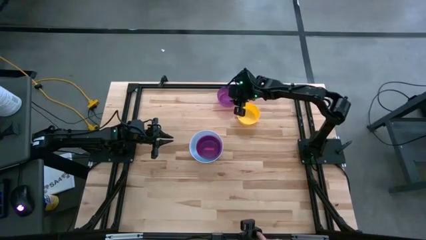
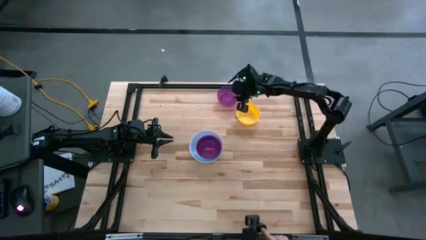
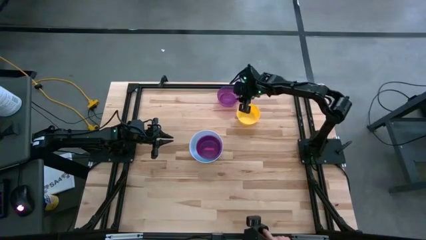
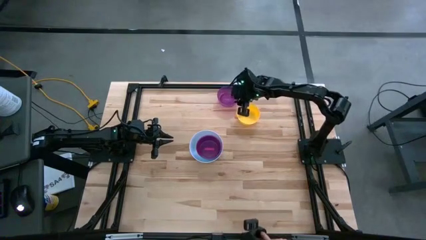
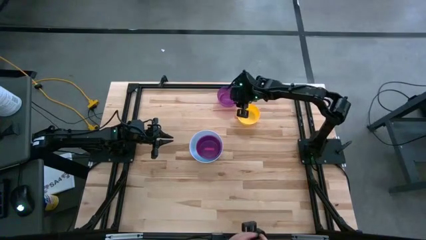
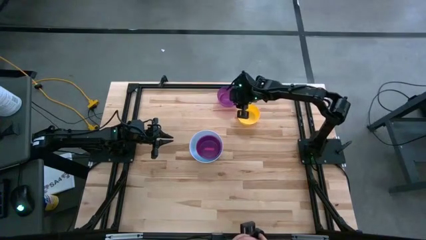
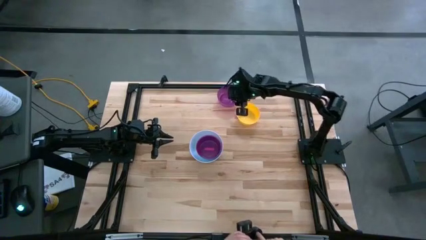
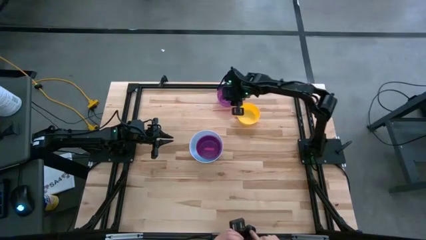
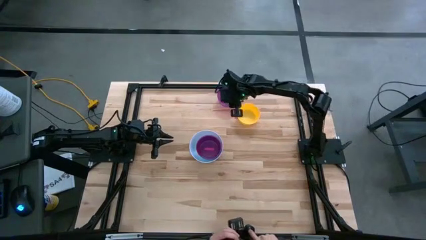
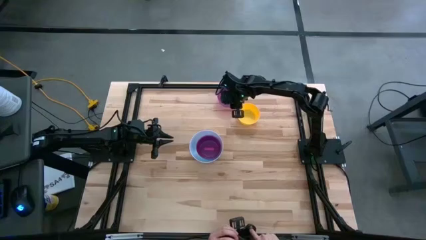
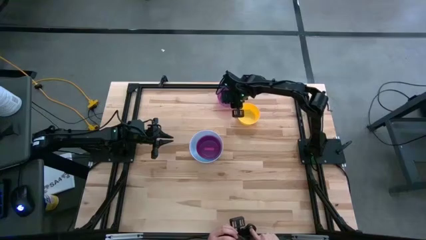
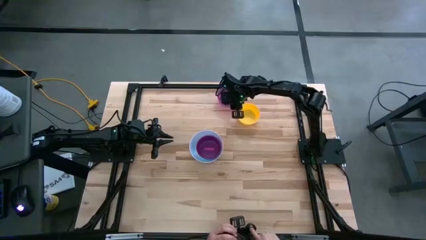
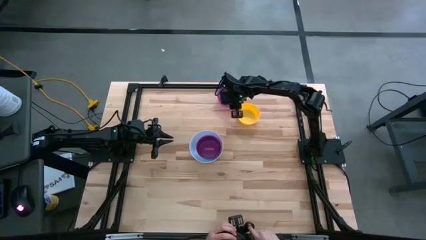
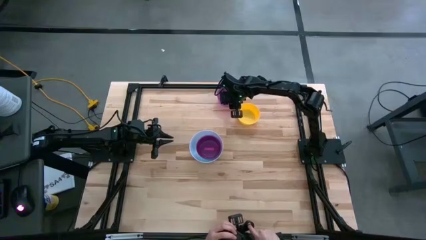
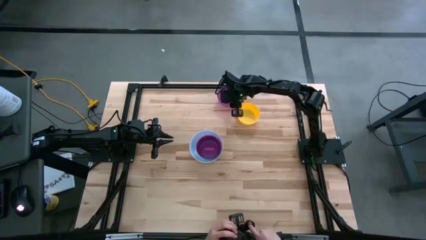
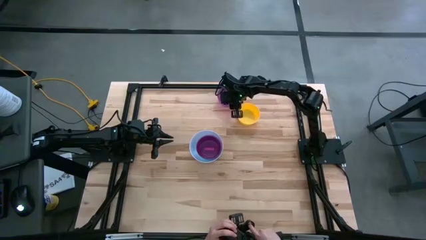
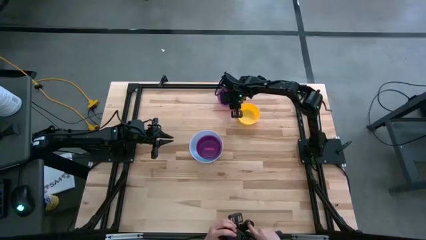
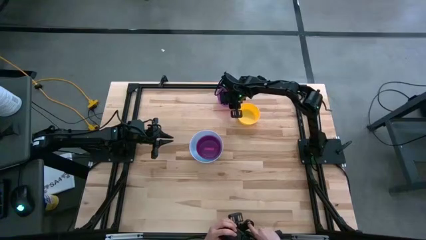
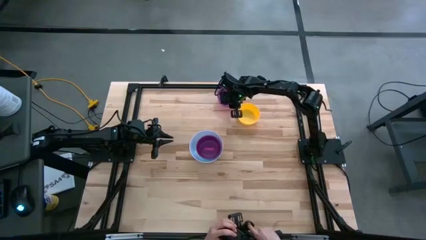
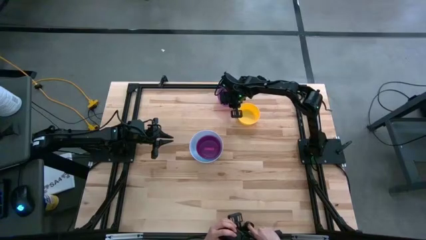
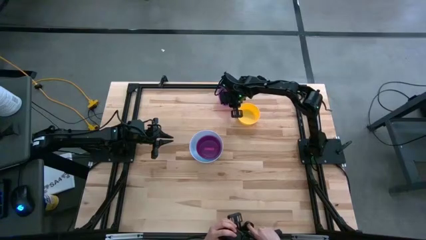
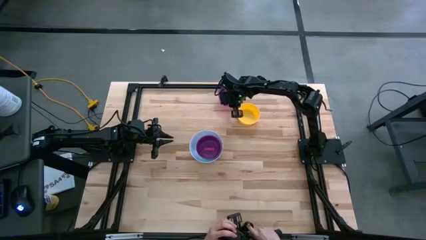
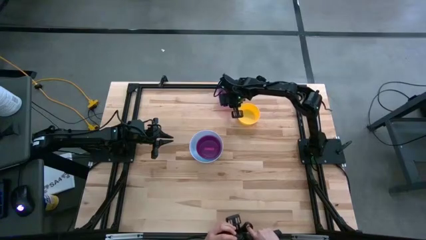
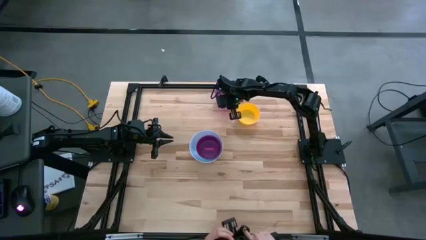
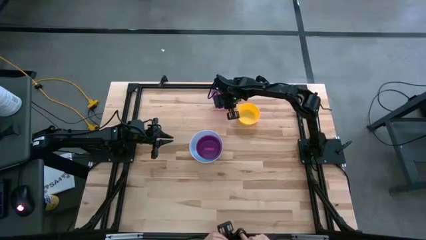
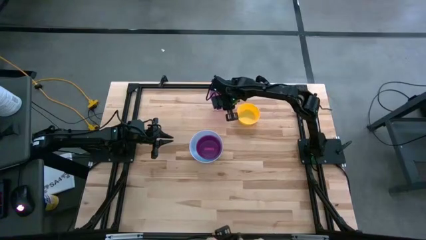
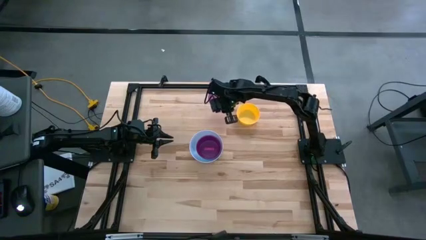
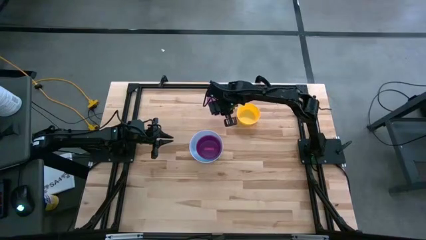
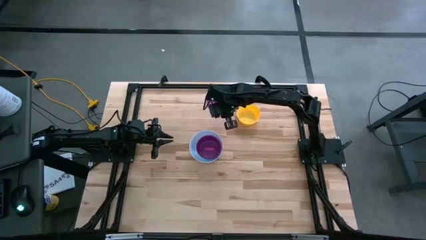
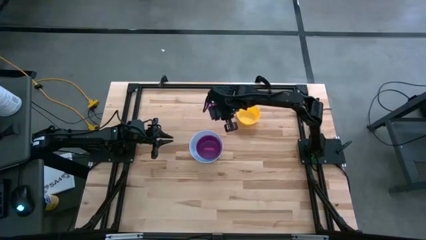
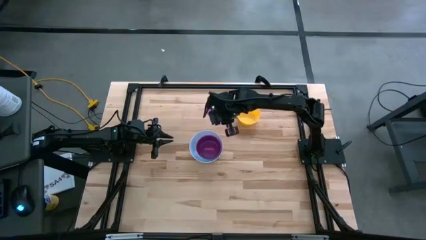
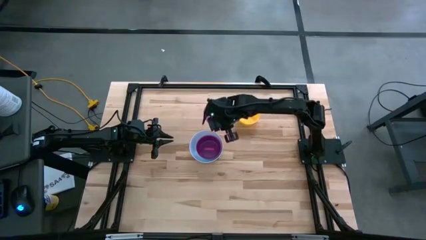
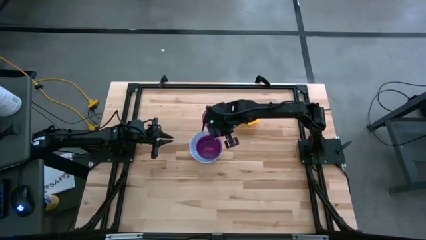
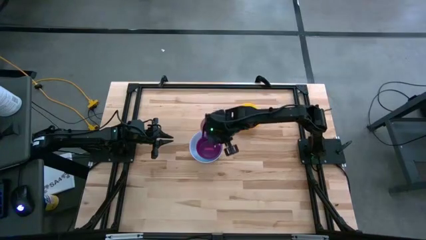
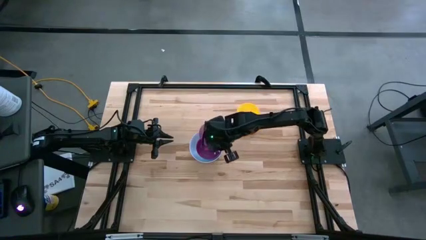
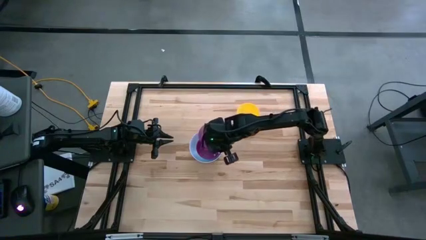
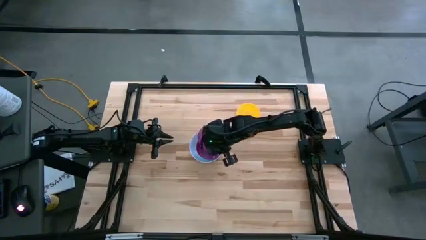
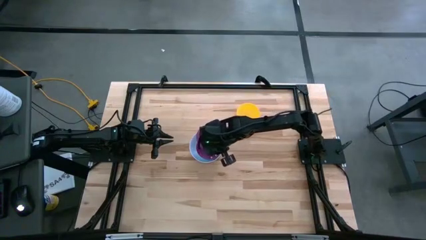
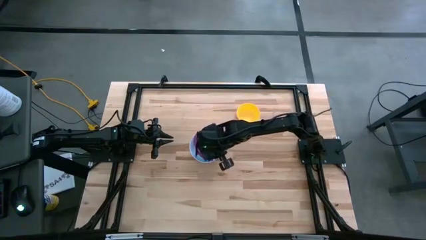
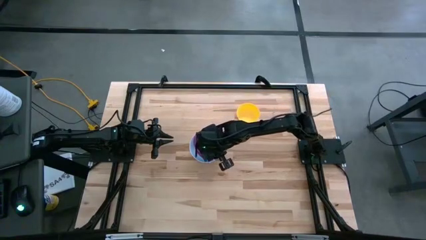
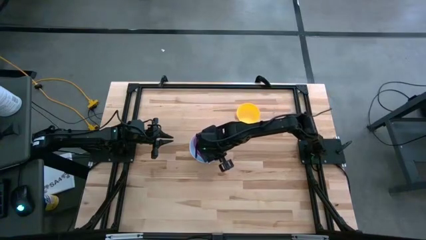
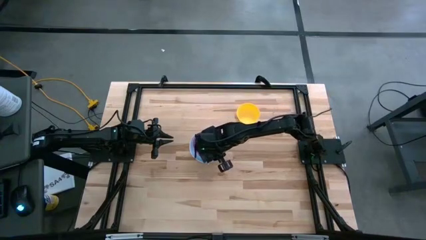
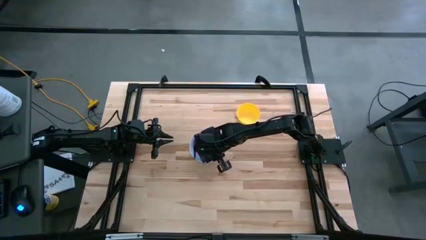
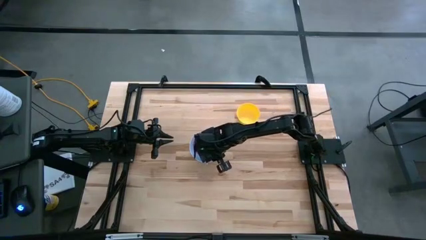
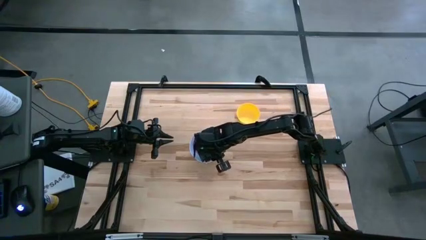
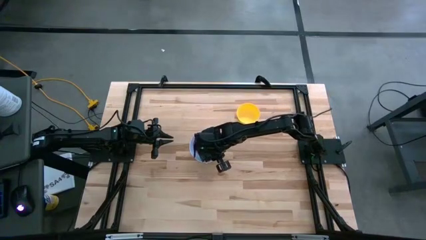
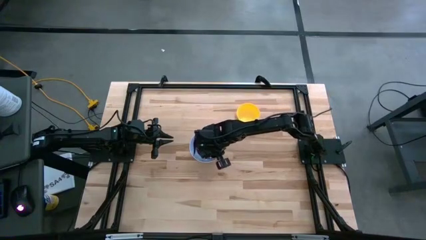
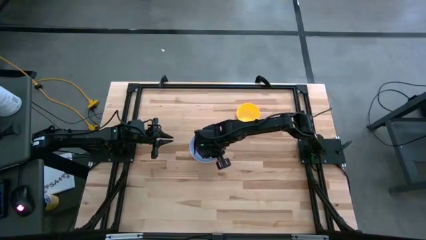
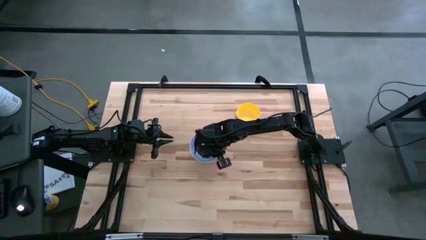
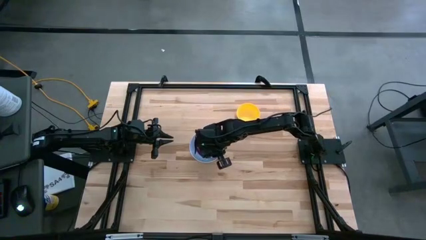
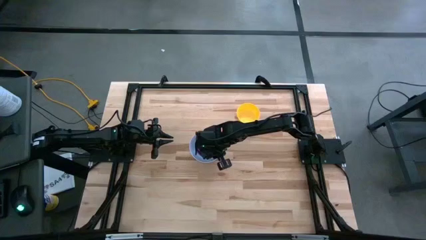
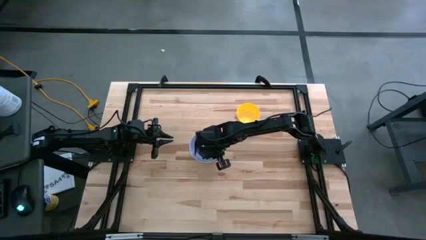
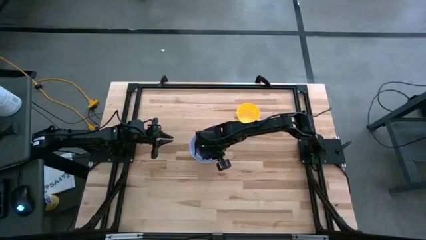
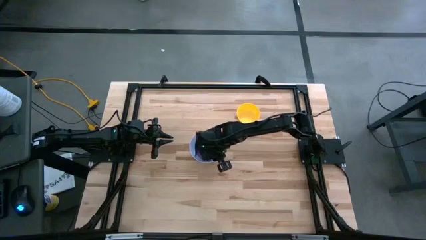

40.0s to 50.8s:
Stack the purple bowl on the pink bowl

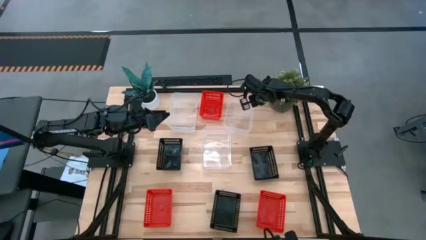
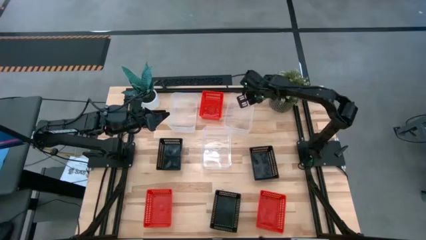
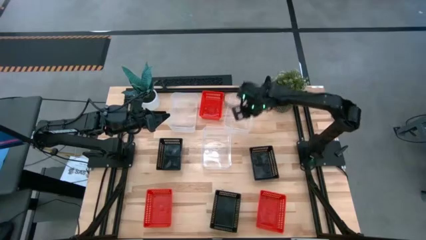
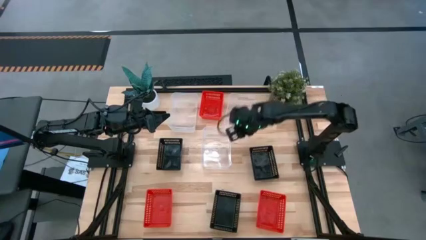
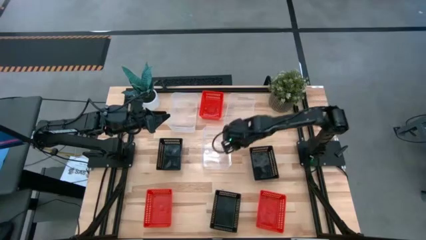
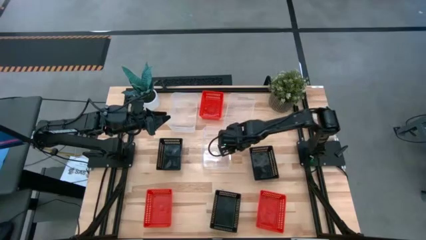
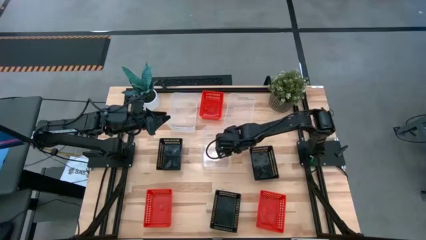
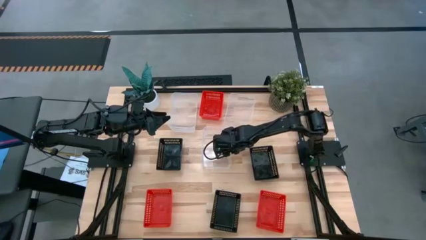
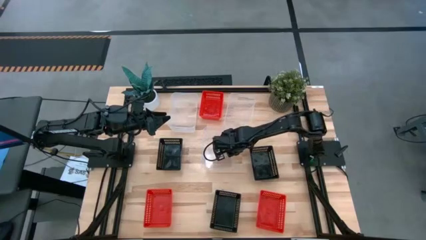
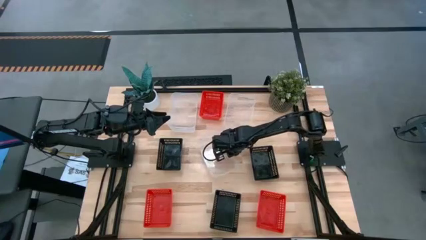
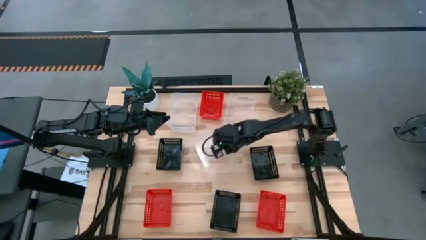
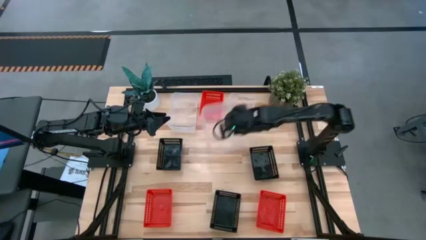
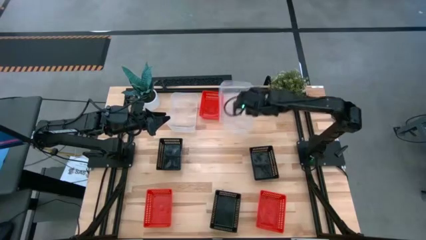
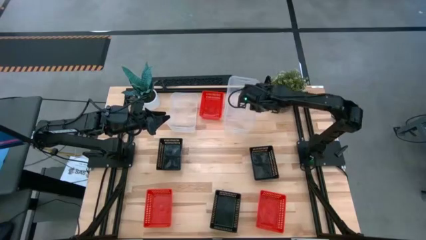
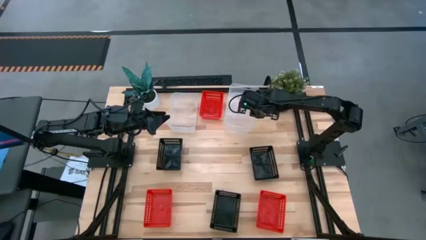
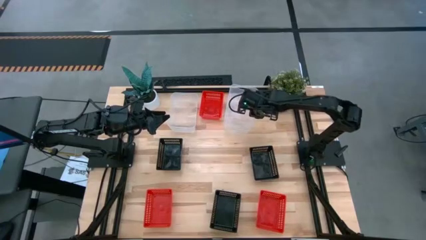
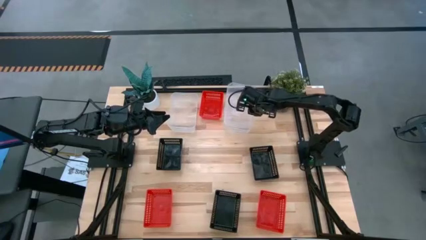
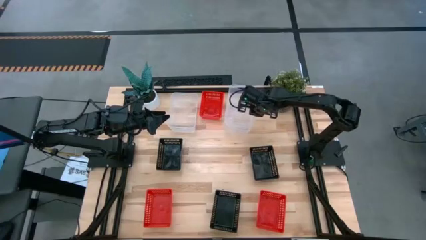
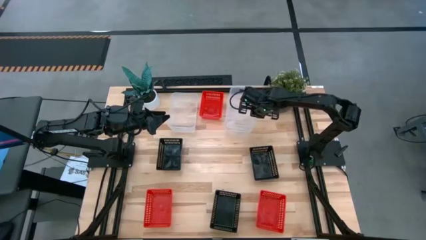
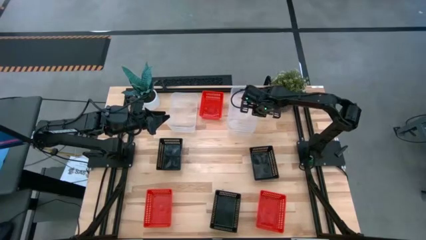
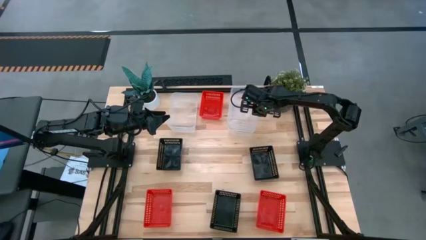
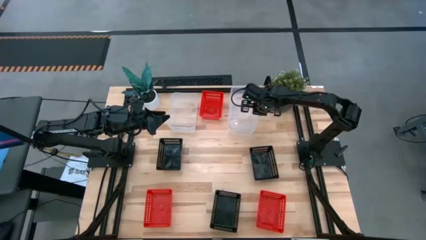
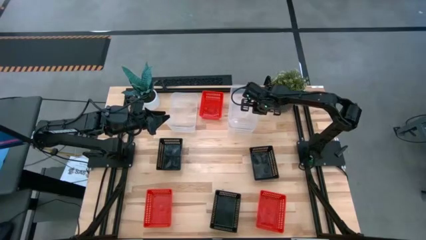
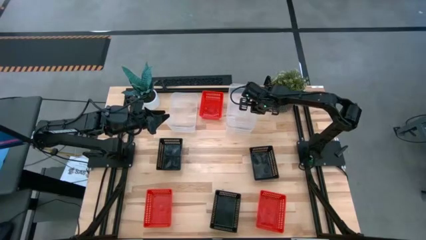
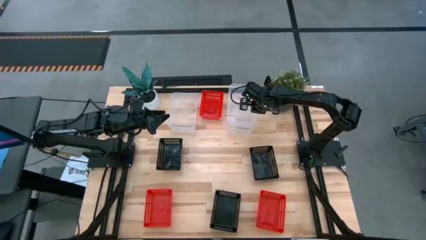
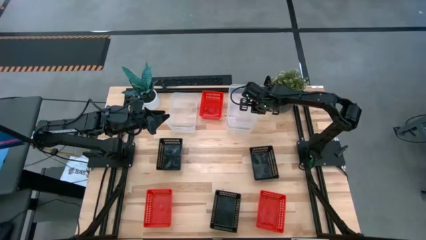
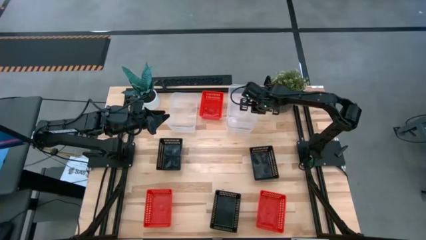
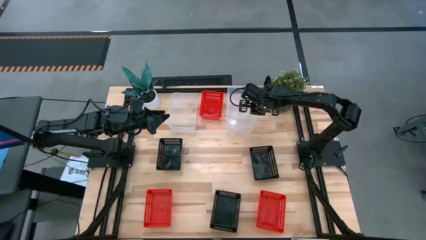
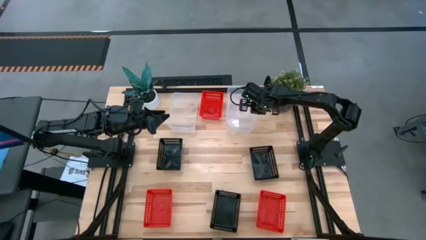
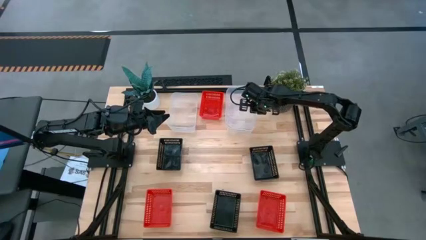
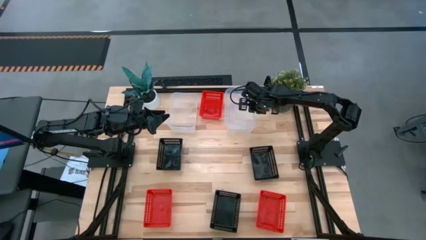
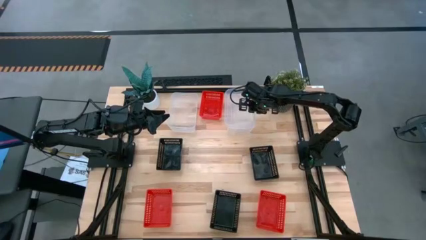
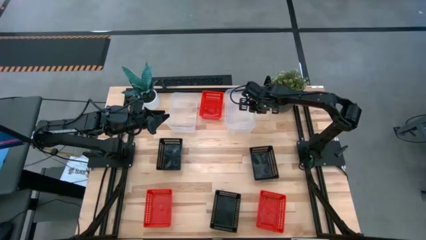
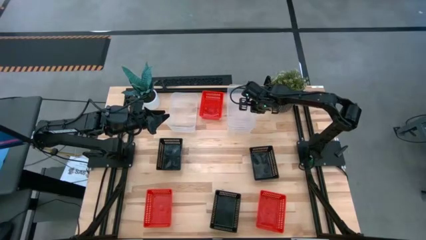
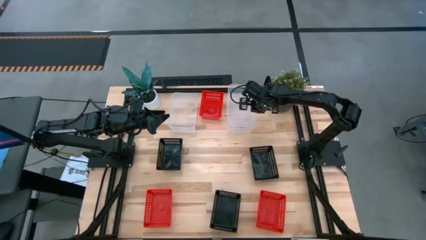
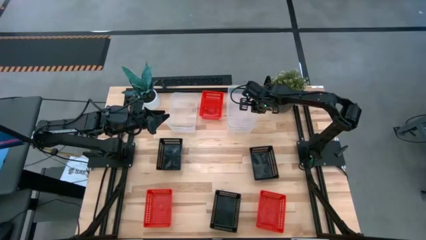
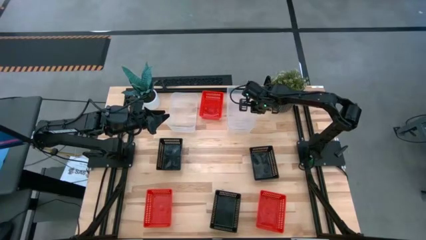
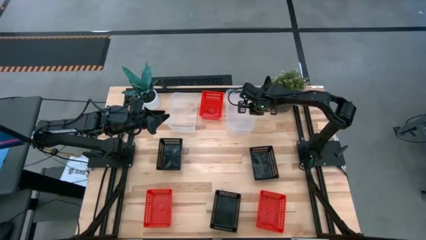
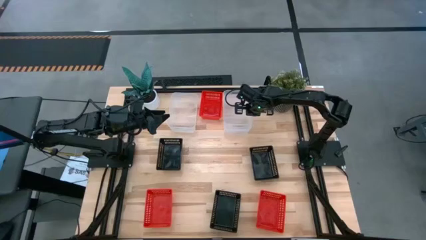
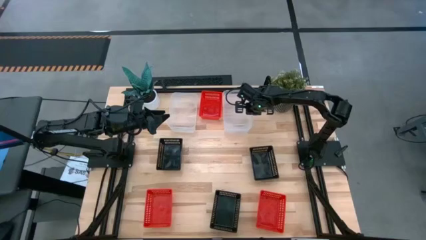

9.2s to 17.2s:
Stack the bottom transparent bin on the top right transparent bin
